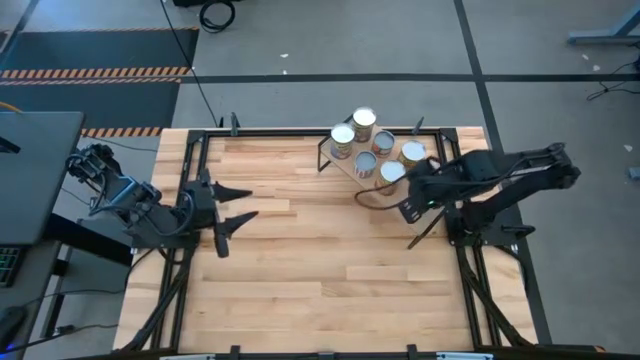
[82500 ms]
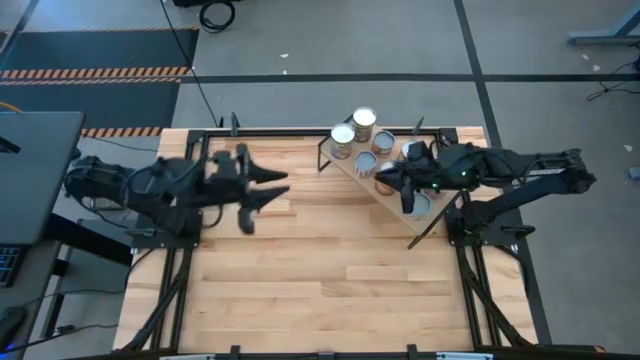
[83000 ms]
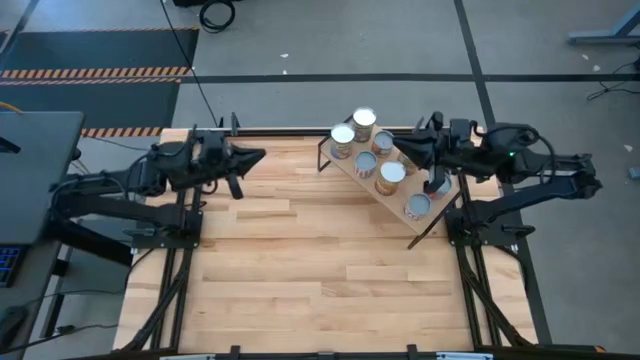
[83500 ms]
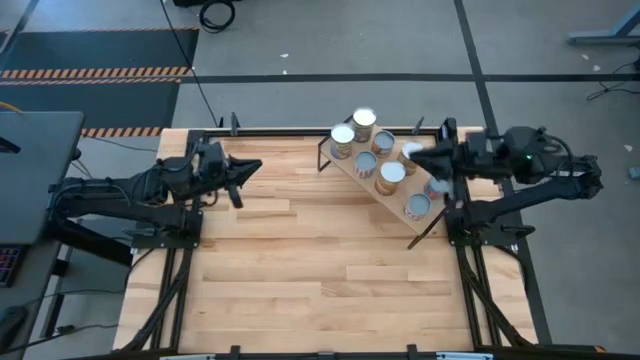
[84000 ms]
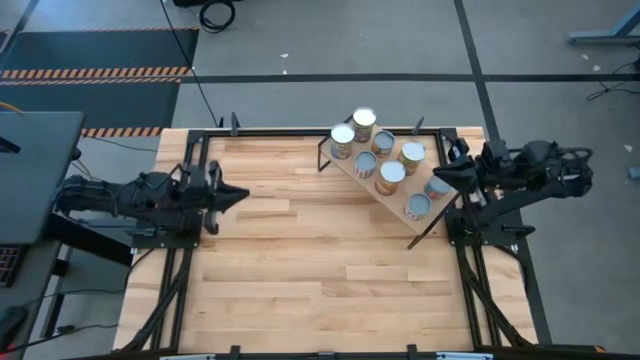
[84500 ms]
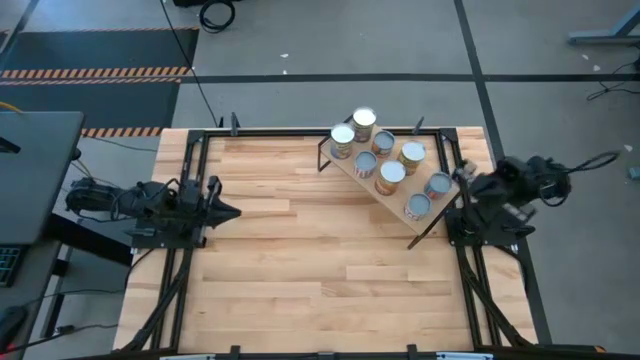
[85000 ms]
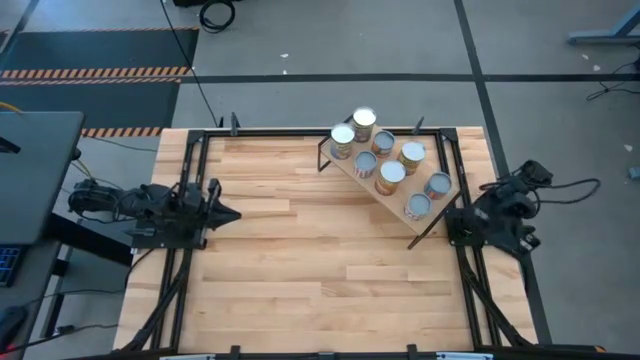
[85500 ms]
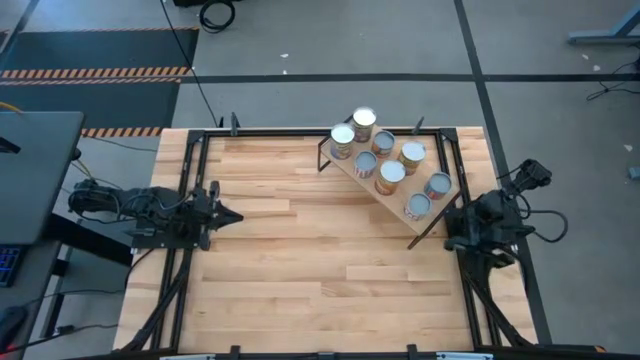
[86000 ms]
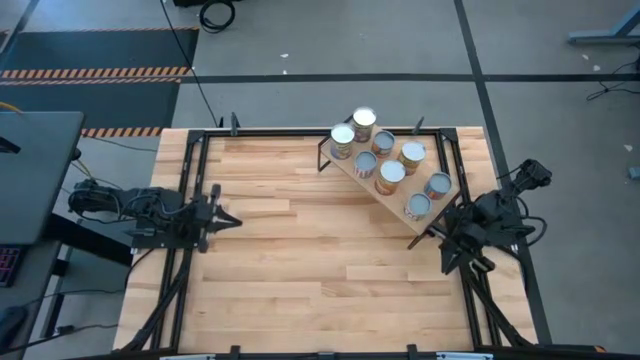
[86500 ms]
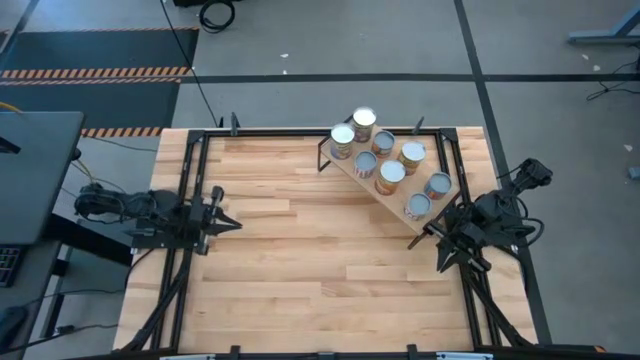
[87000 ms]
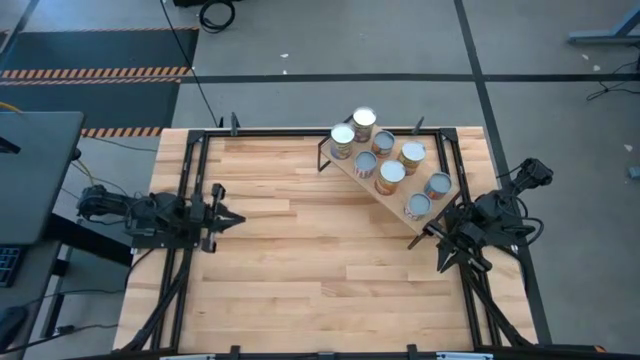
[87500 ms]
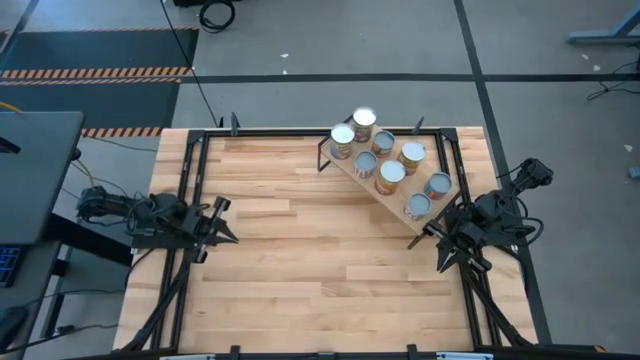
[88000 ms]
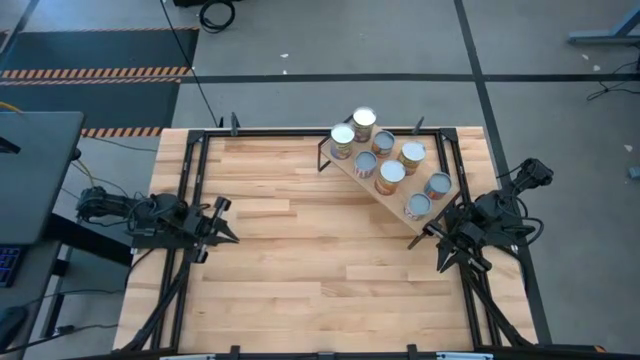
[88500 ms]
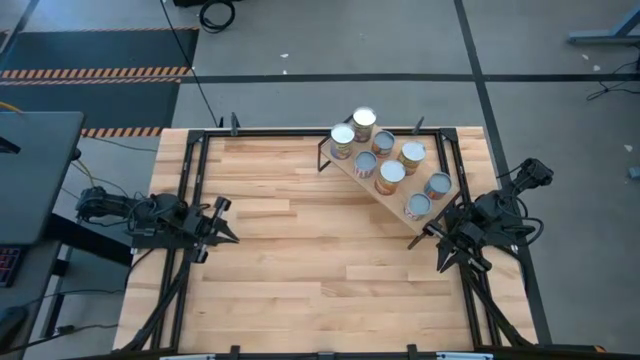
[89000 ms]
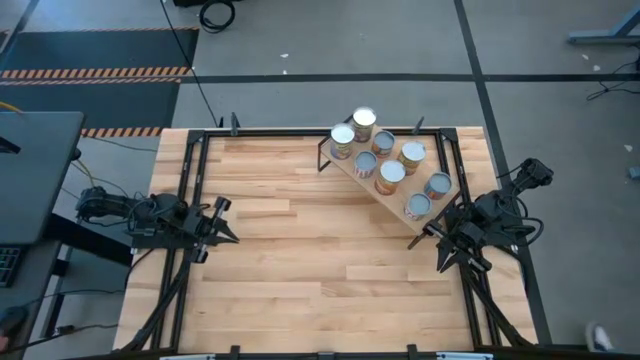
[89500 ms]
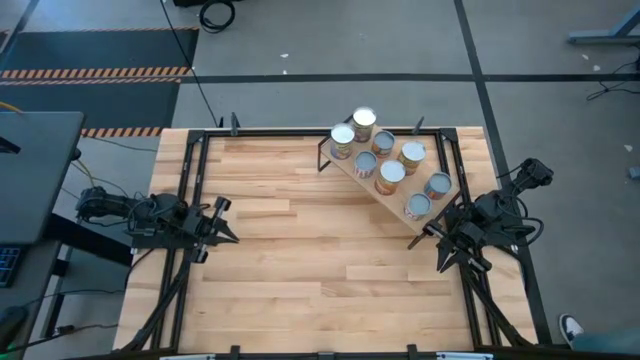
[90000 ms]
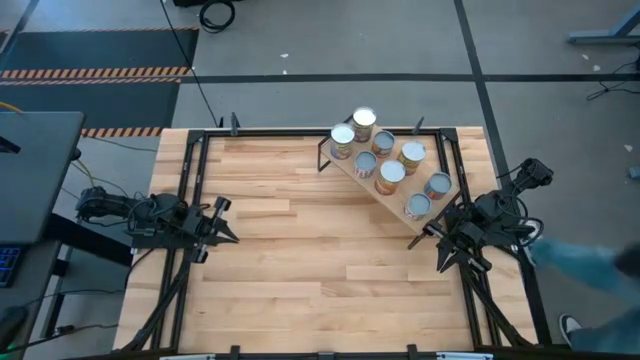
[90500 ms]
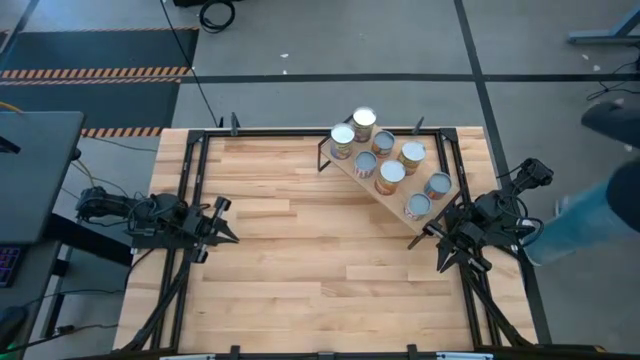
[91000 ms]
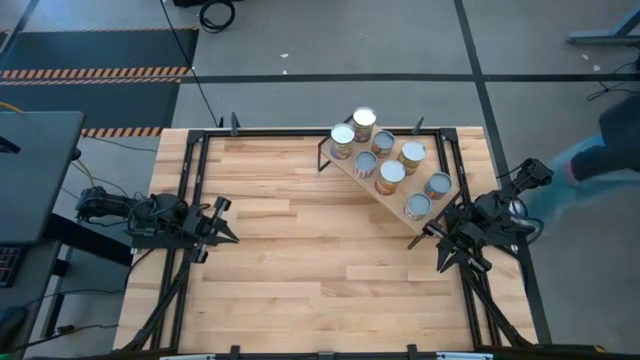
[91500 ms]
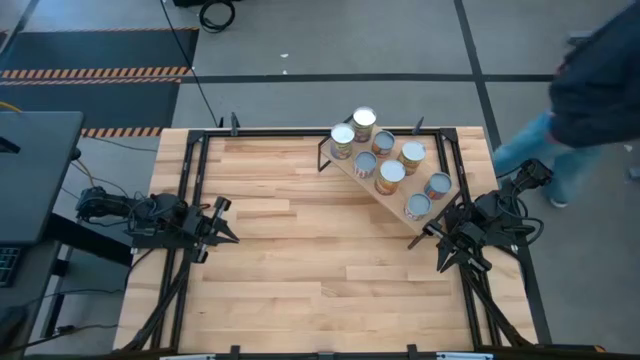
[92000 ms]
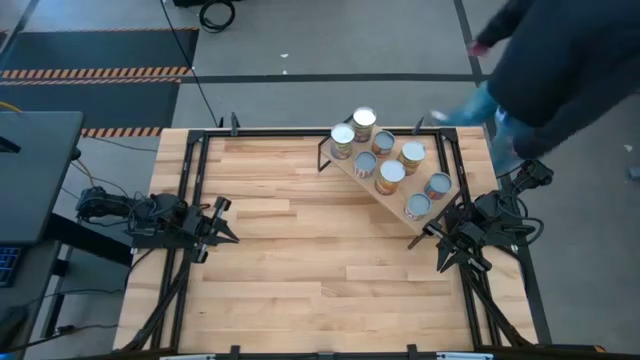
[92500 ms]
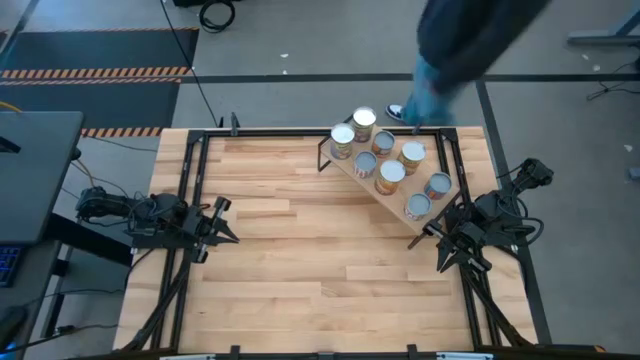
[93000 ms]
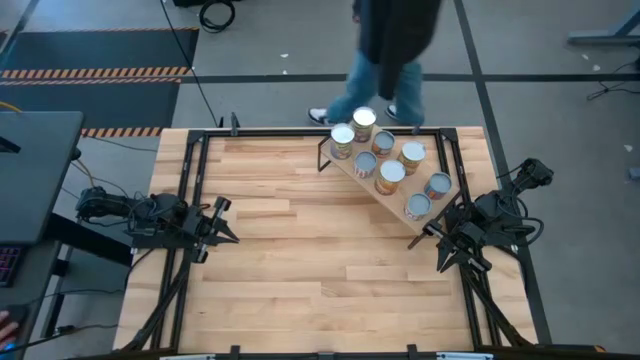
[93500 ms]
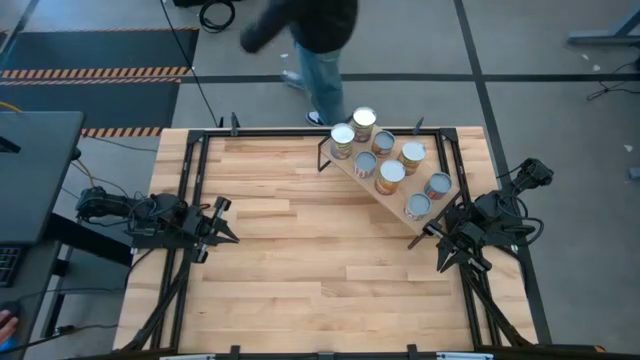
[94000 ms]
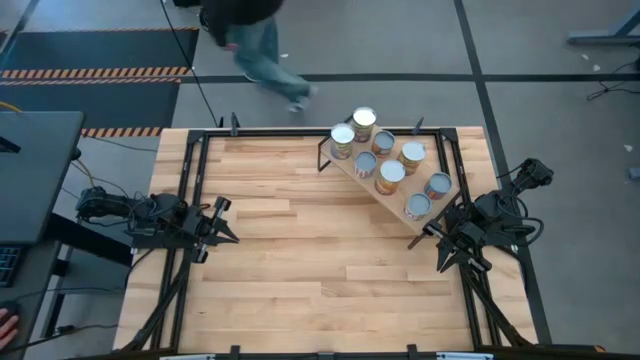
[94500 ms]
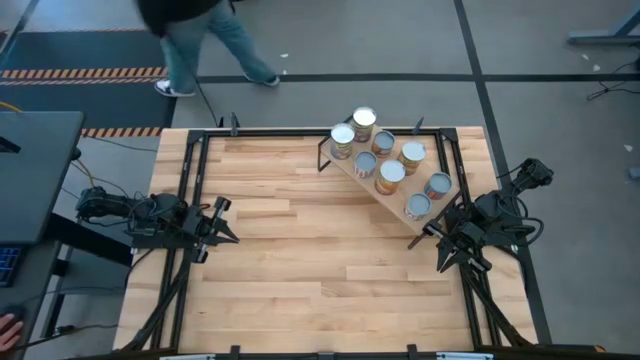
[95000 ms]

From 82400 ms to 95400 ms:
Task: Pick and place cans onto a shelf
Return to Home Position

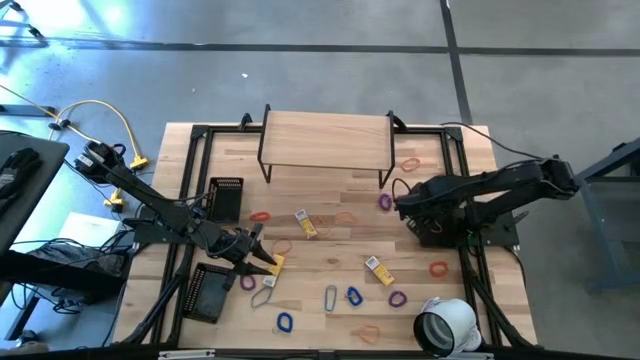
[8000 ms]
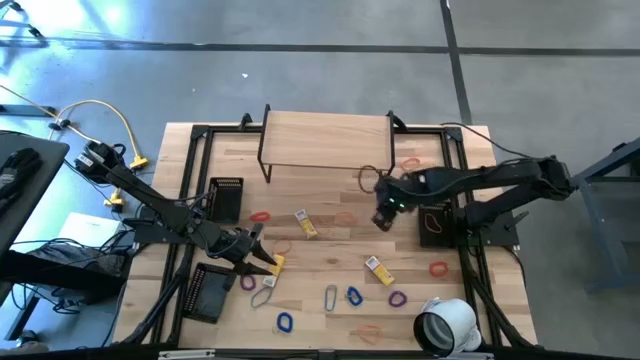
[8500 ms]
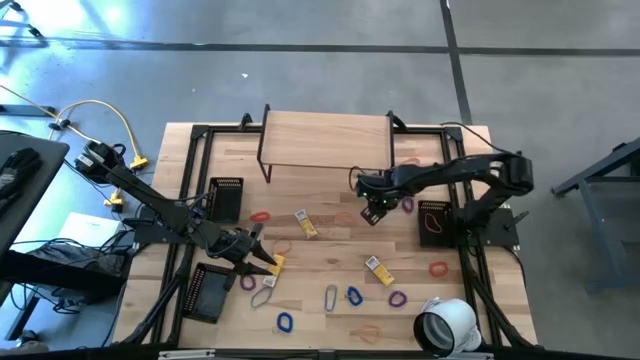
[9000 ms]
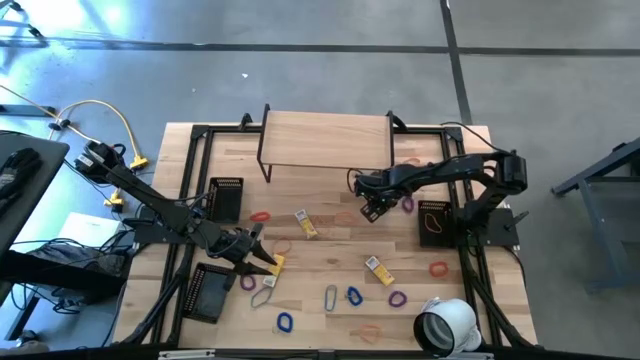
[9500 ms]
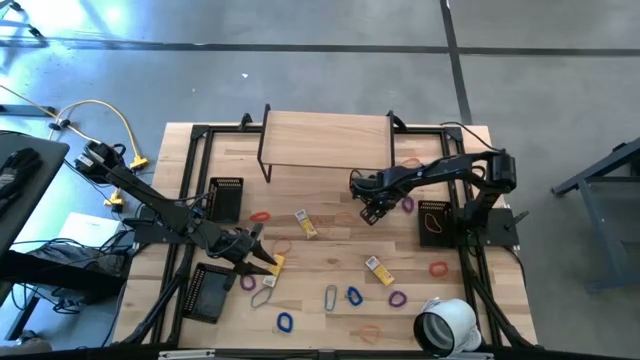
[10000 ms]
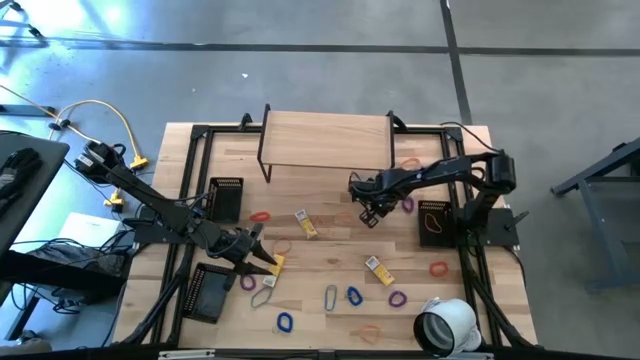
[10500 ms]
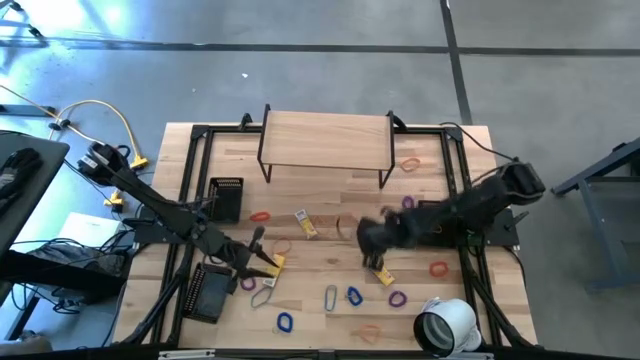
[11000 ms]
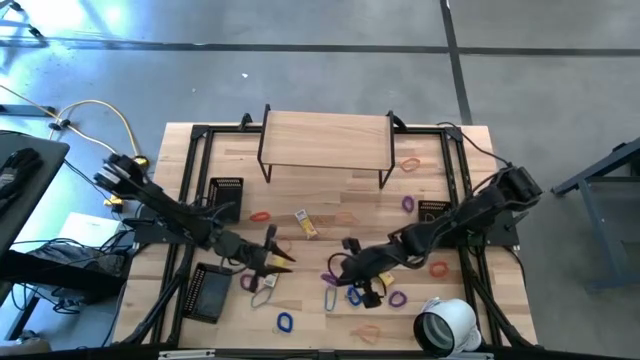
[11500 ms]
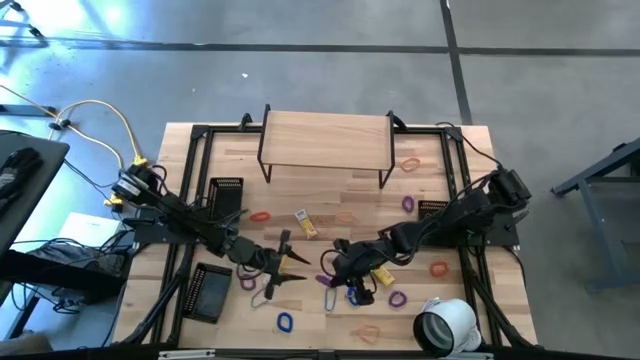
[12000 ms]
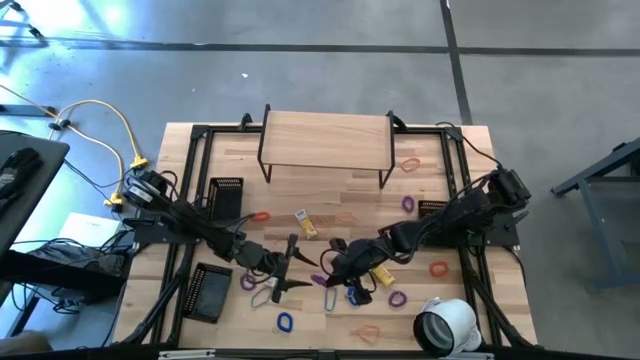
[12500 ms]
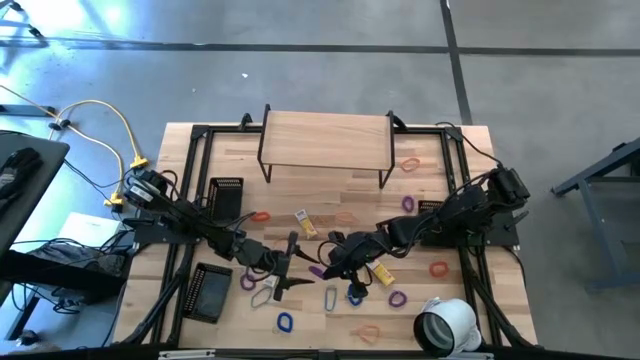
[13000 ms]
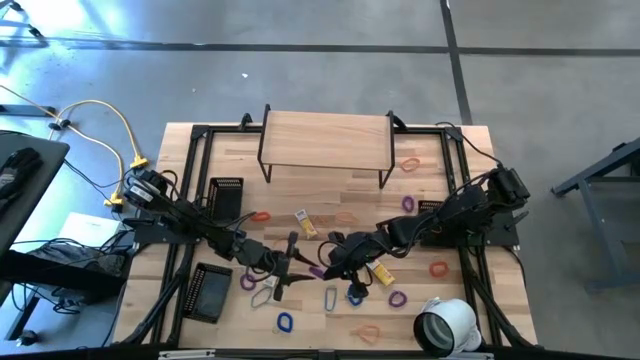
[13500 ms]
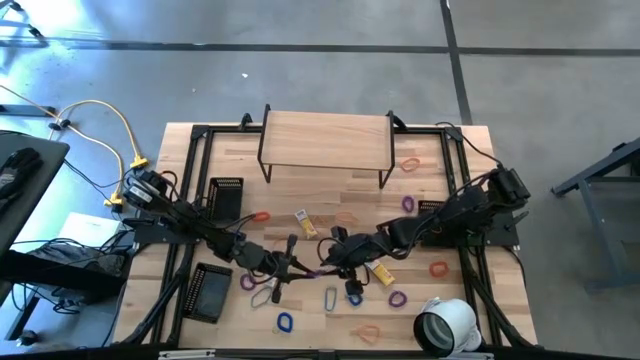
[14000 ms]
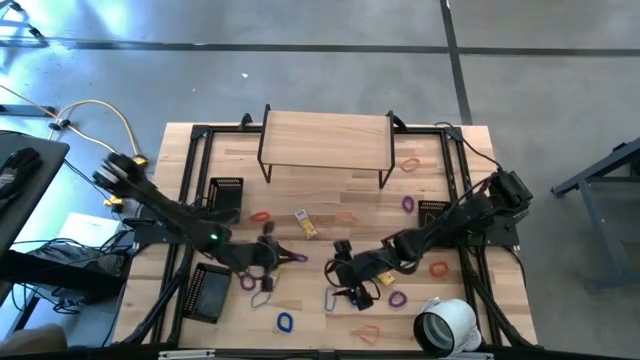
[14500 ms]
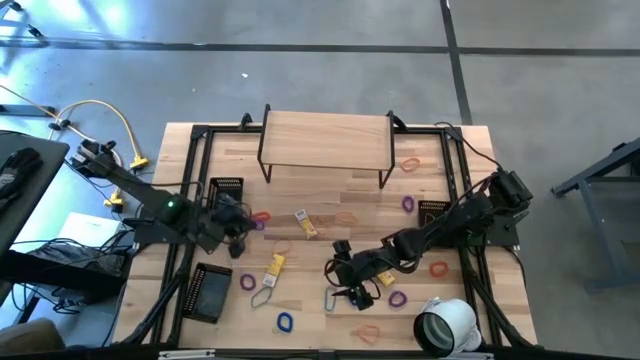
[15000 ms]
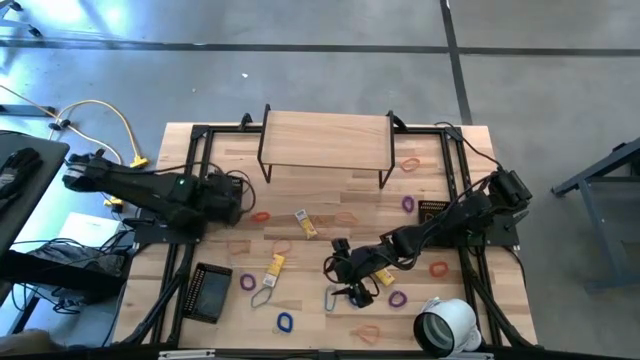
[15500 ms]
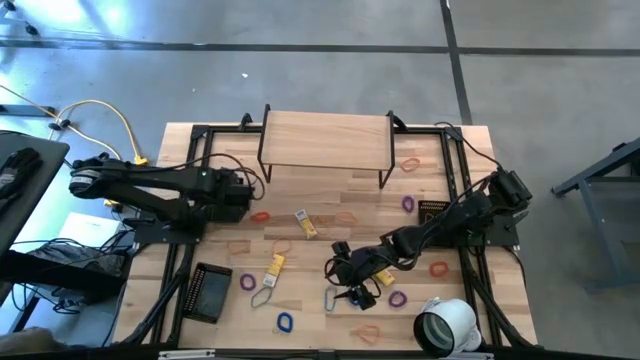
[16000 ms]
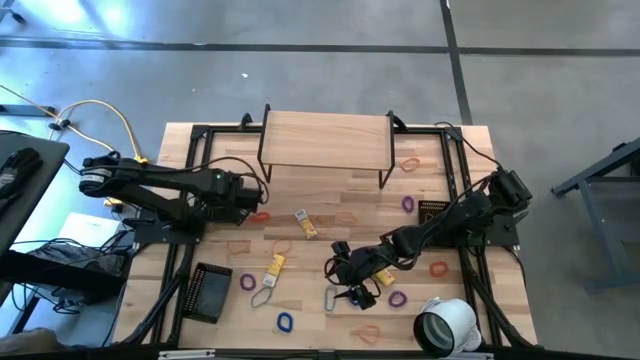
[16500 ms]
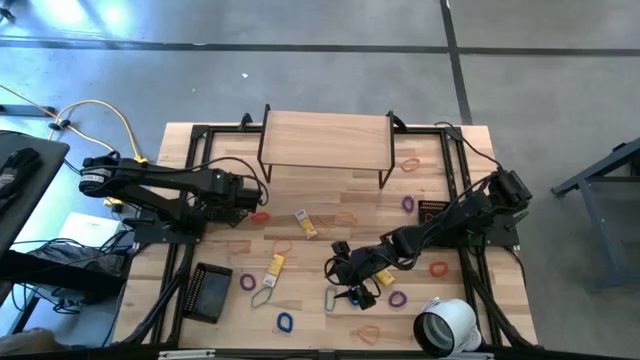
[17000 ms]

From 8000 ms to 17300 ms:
Task: Pick & Place Office Desk Supplies
Put the violet spring keychain into the top black bin
